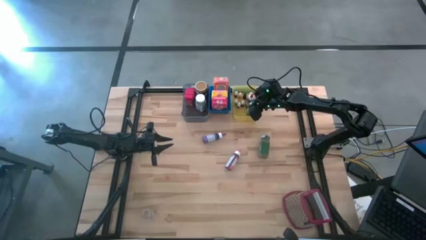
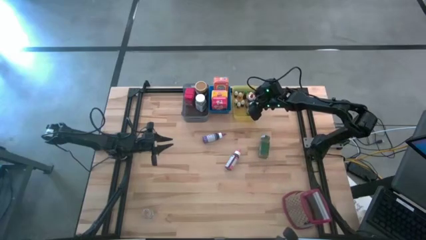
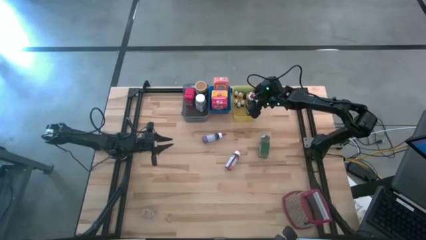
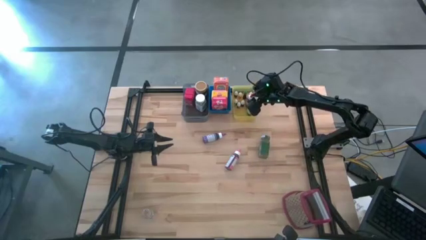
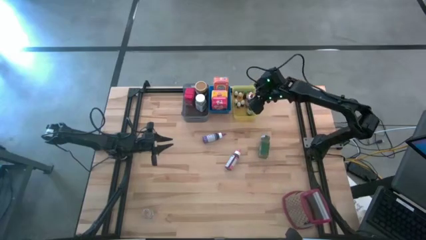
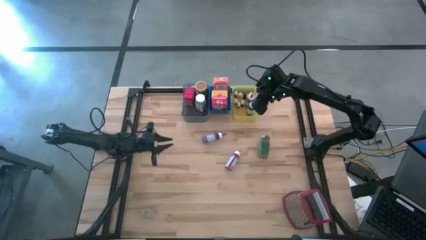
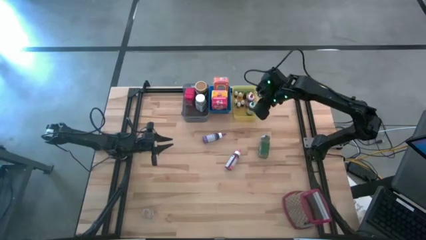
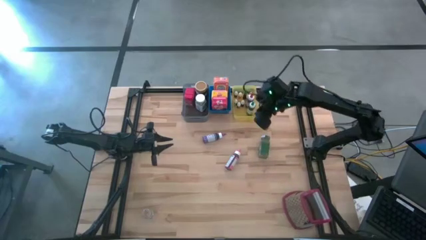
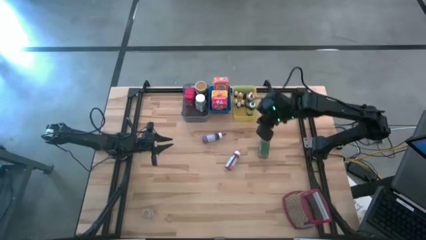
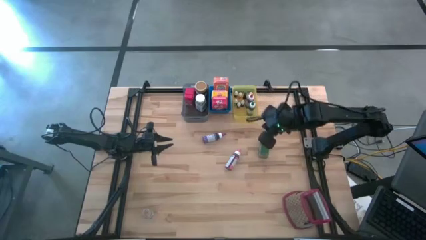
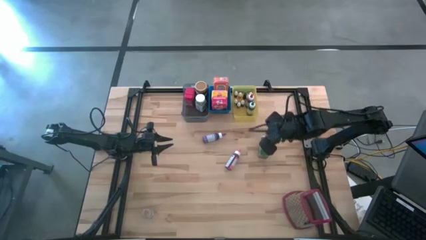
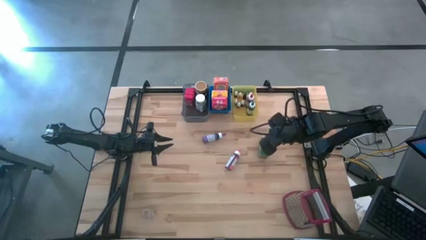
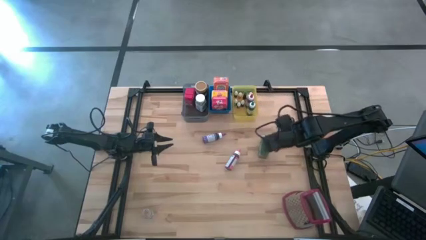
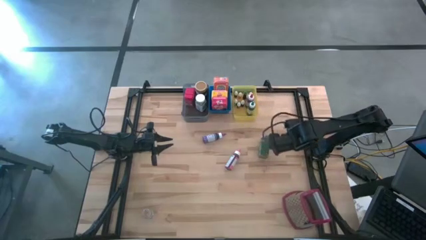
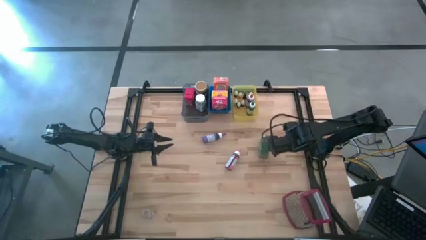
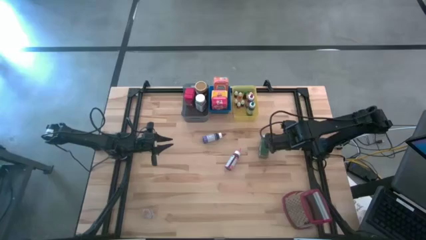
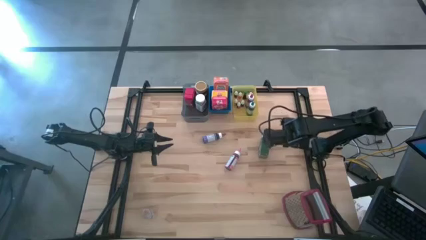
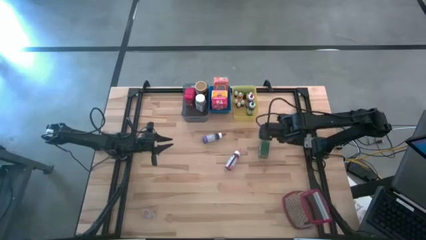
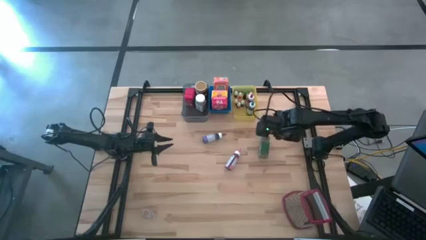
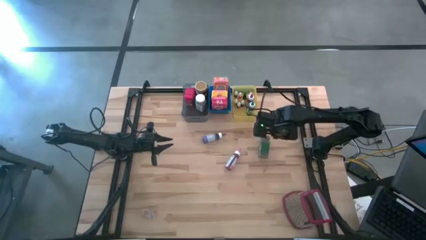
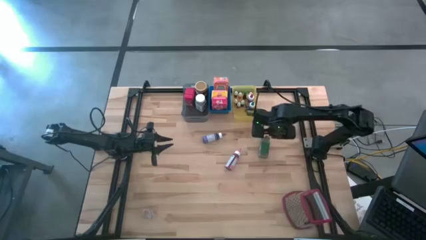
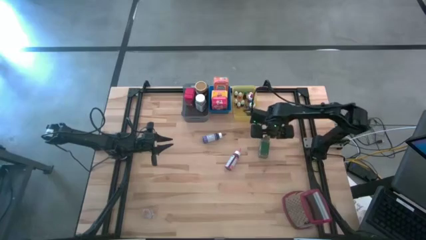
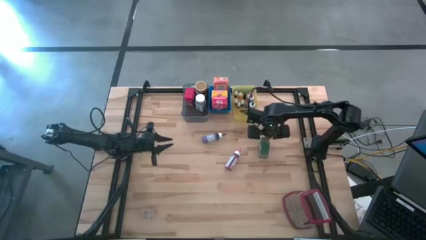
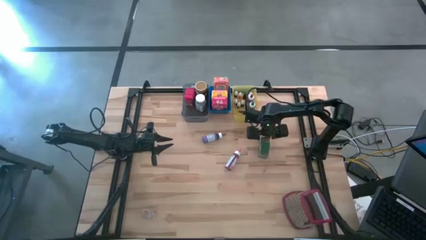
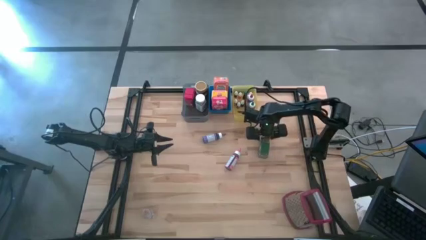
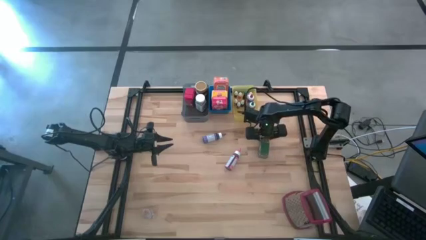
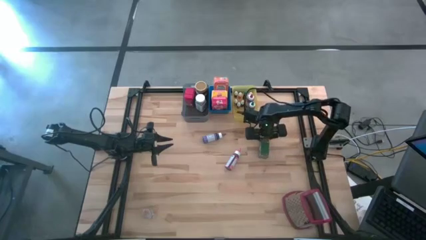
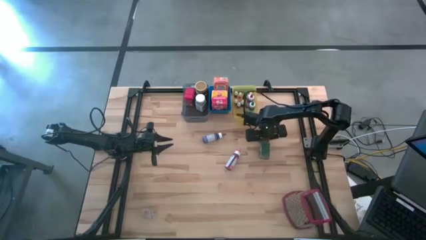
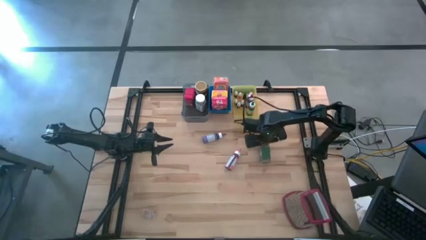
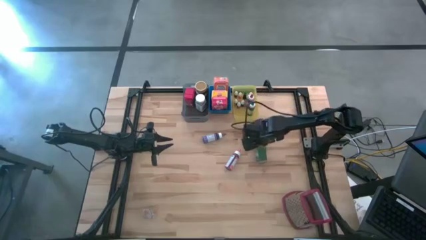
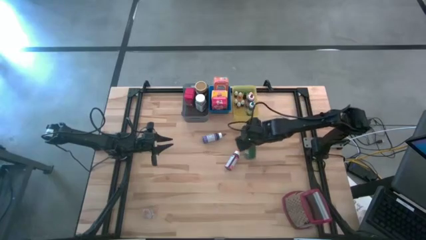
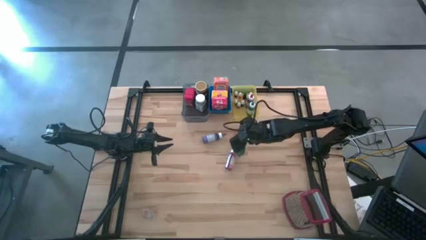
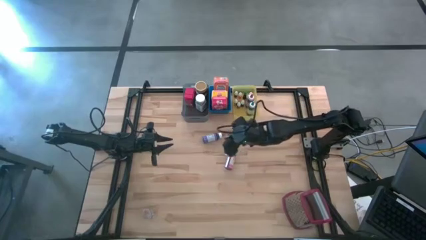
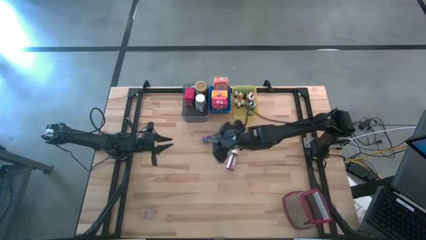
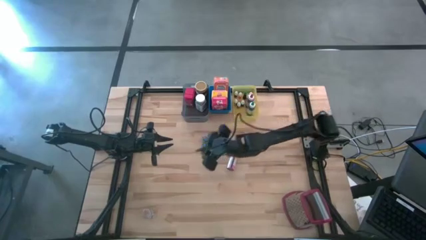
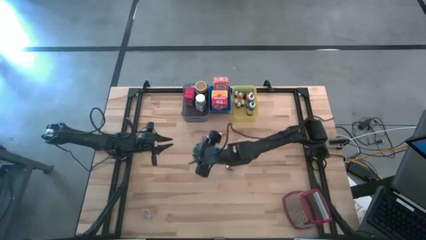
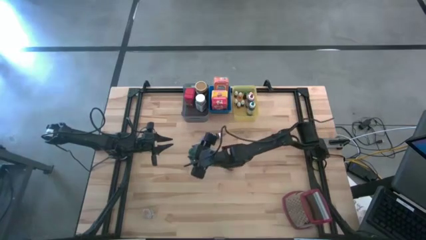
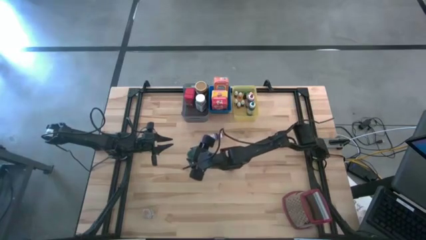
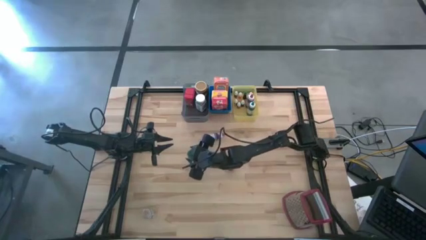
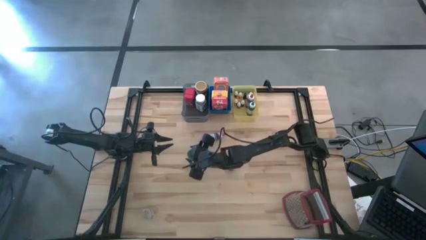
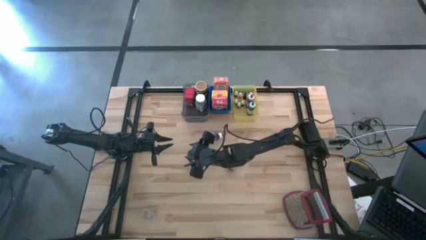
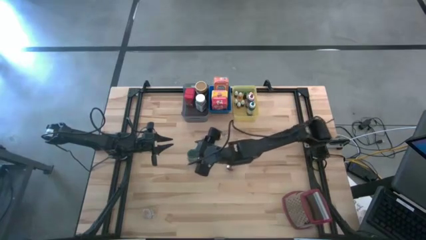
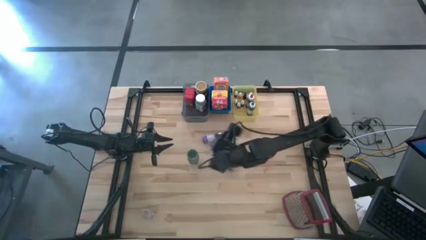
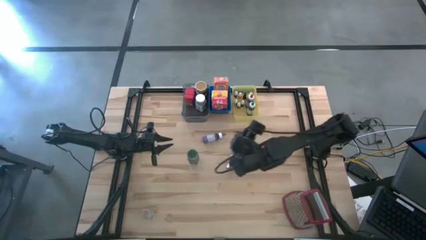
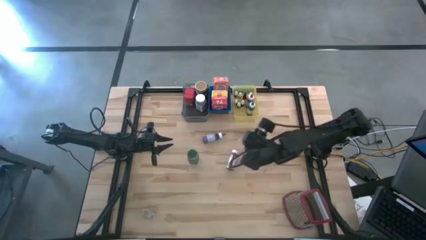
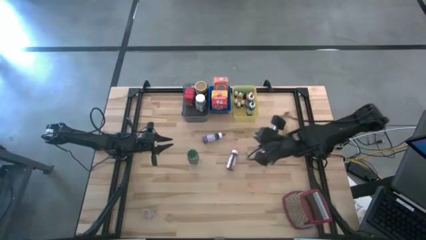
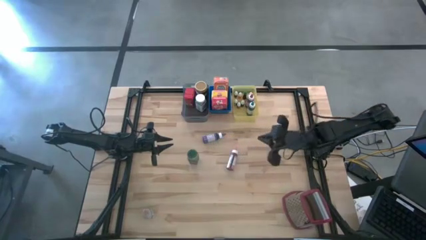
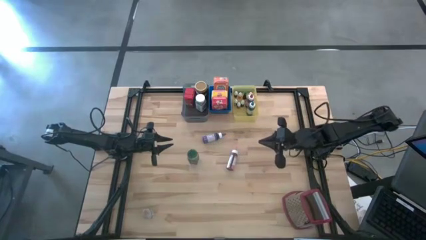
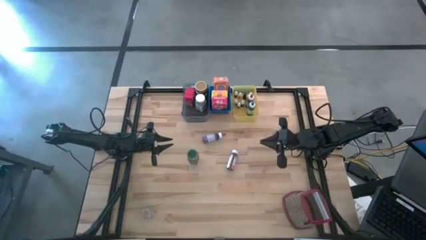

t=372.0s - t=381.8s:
Task: Pick & Place Kitchen Items
Put the green spice bottle into the black bin

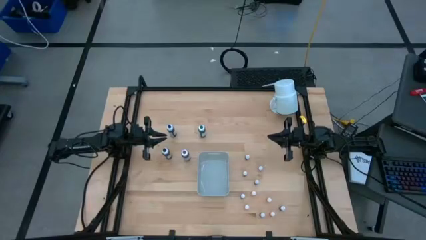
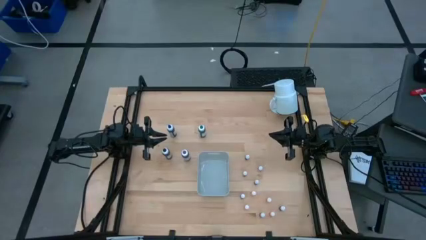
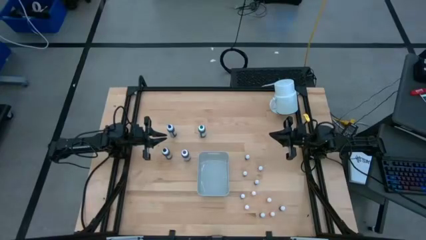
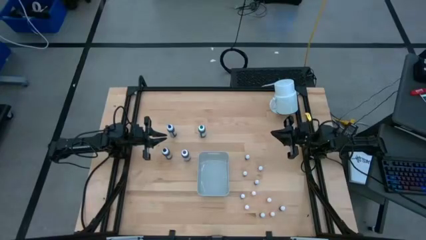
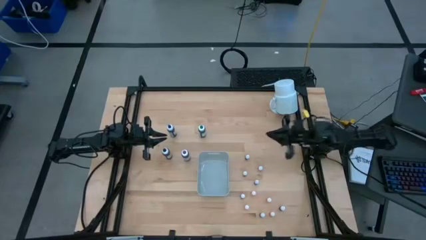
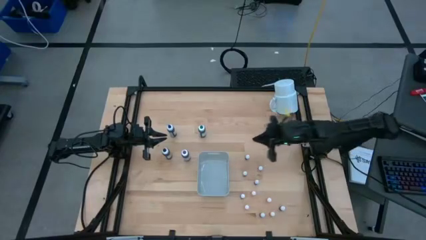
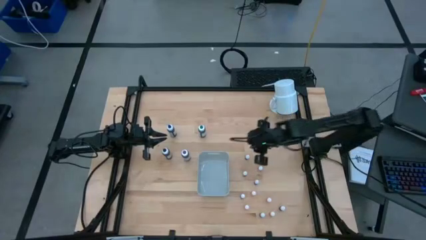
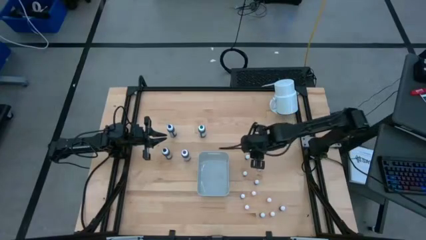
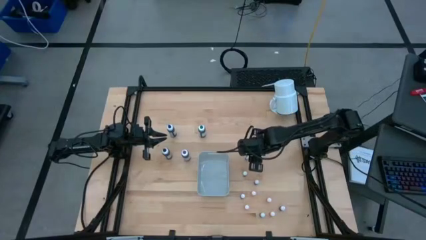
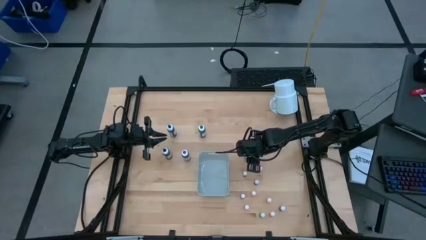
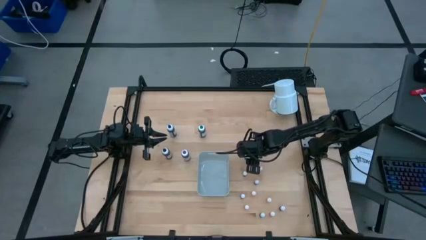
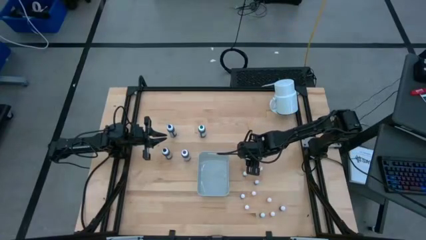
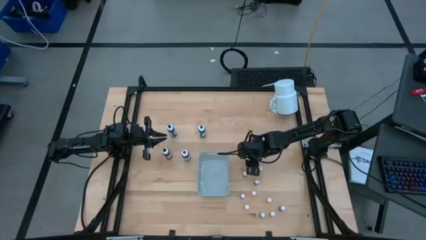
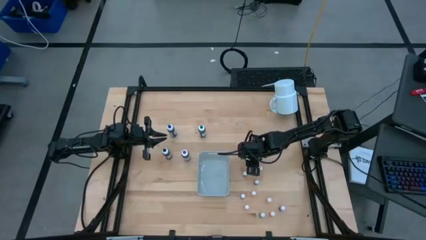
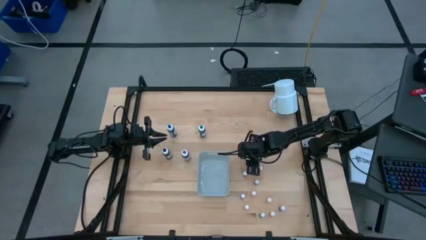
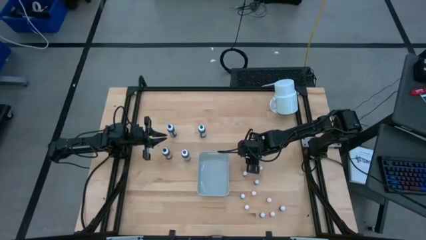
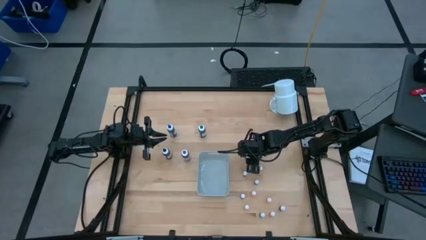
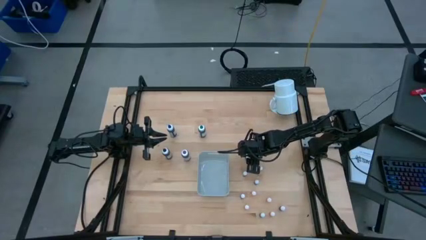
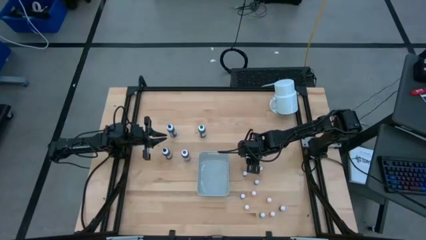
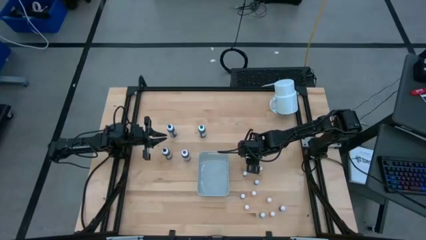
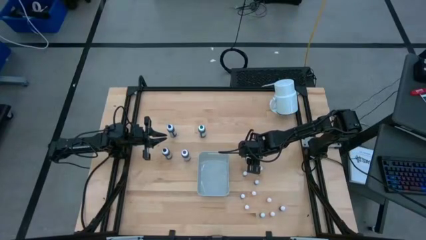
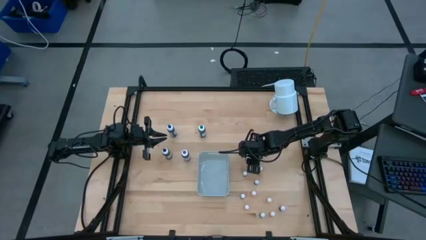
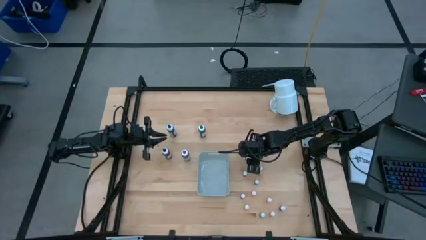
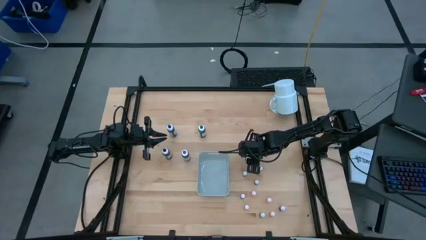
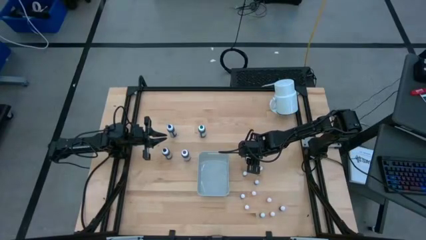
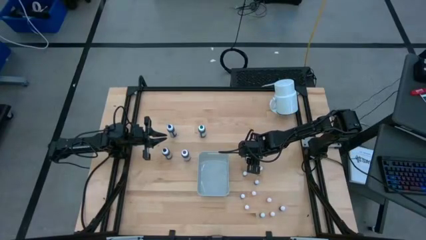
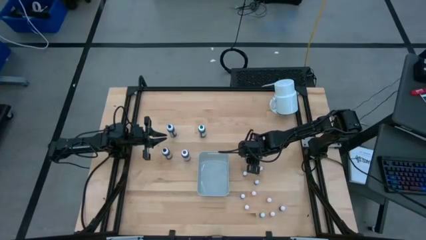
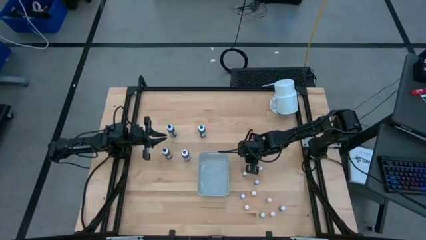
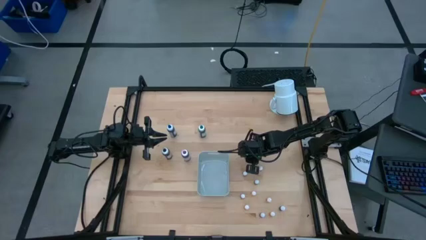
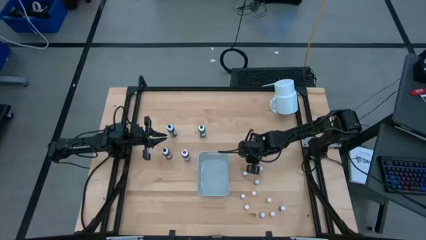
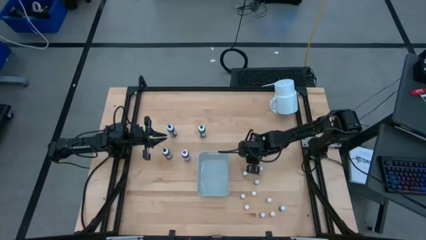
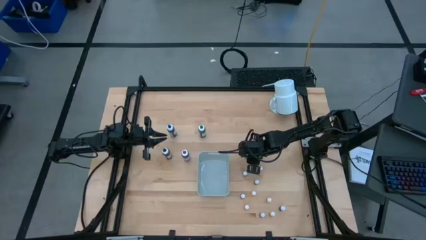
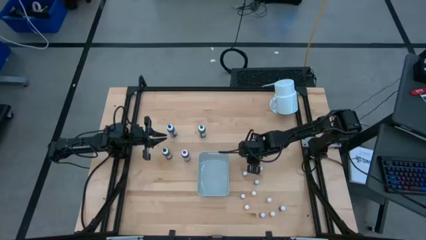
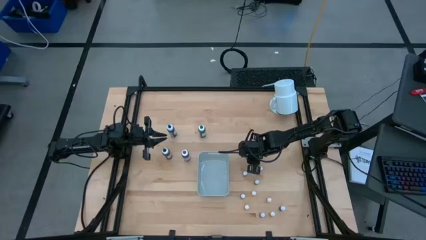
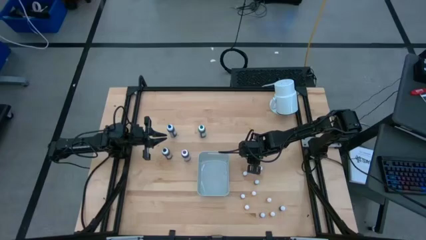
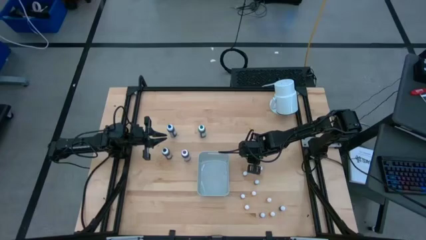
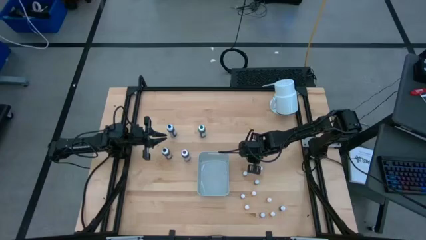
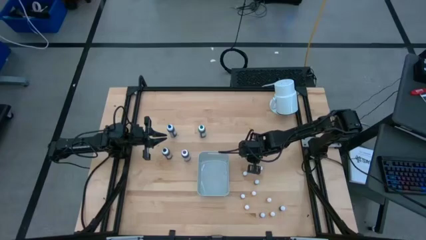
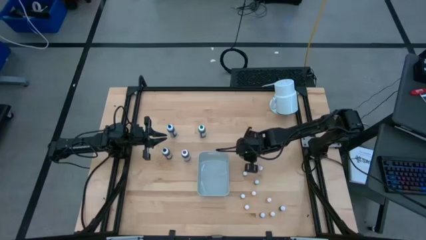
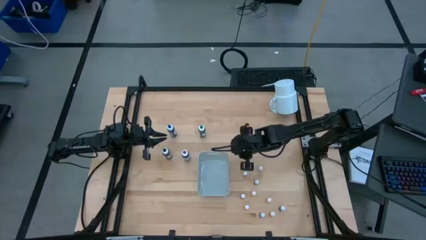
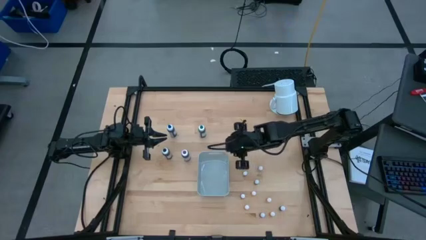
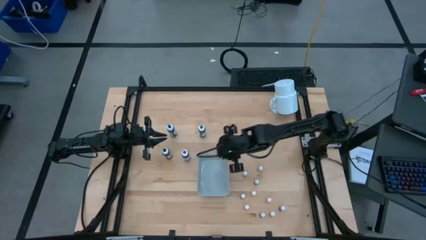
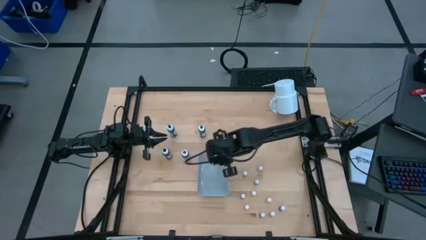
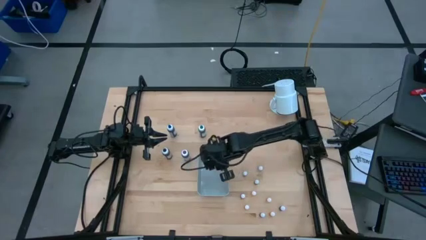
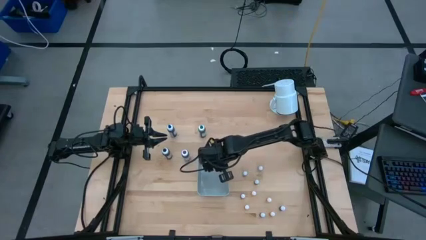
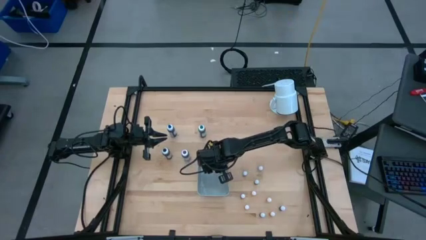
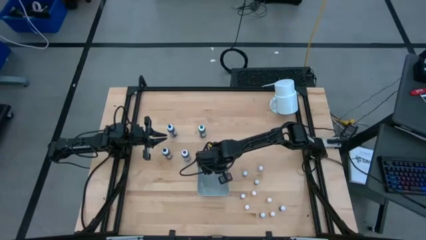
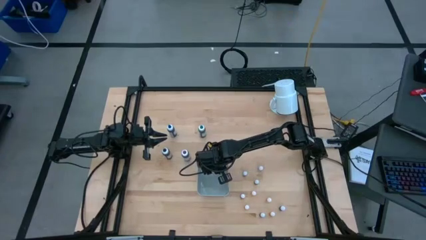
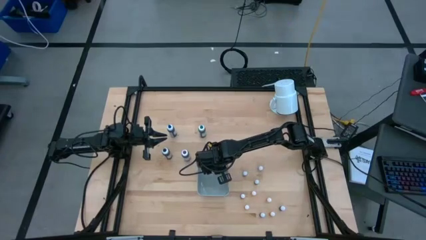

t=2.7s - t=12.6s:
Task: Pick & Place food coloring
Put the small violet food coloring bottle into the white bin
